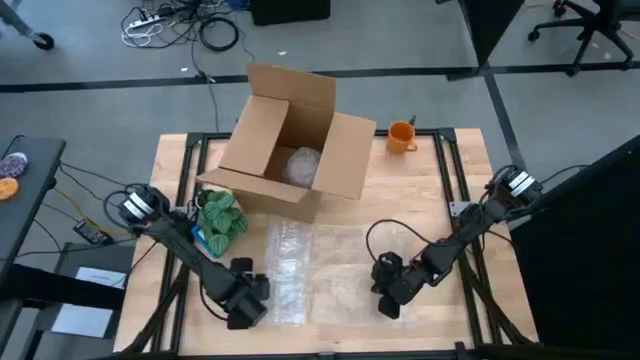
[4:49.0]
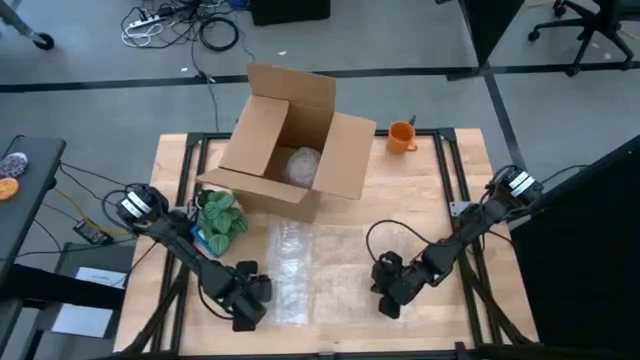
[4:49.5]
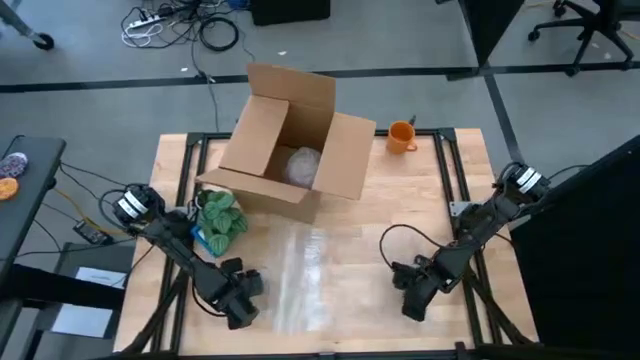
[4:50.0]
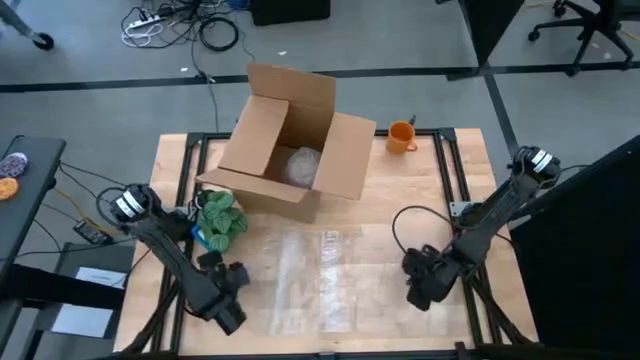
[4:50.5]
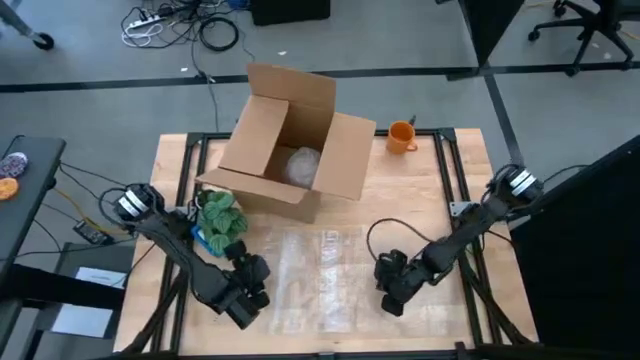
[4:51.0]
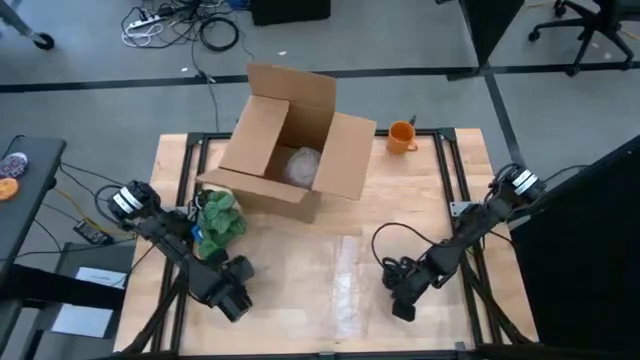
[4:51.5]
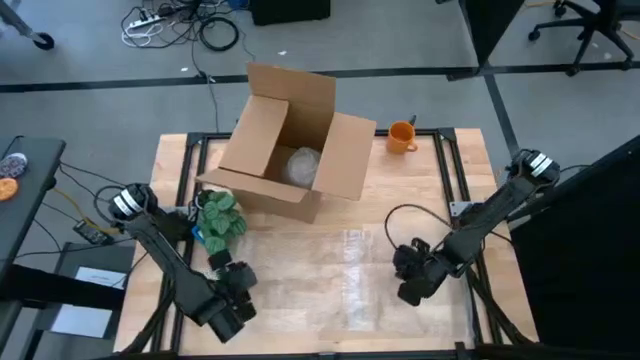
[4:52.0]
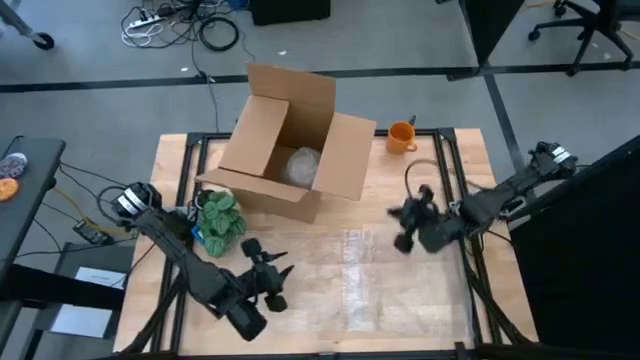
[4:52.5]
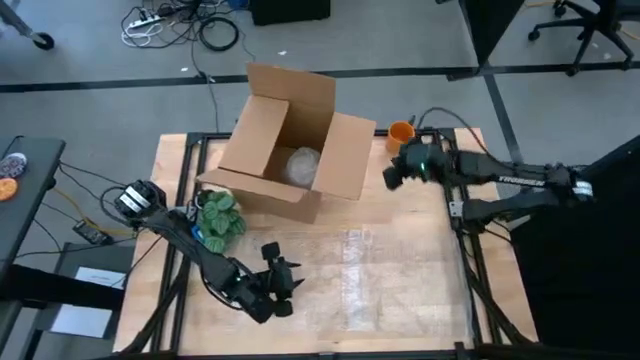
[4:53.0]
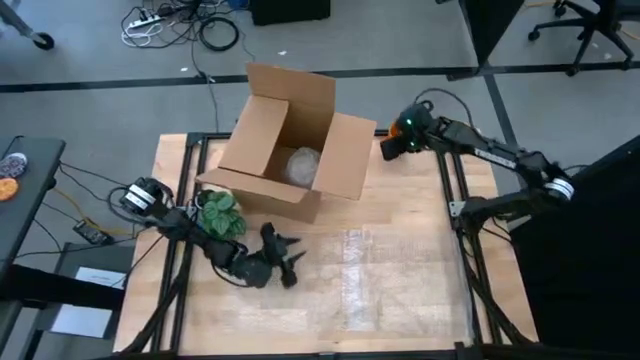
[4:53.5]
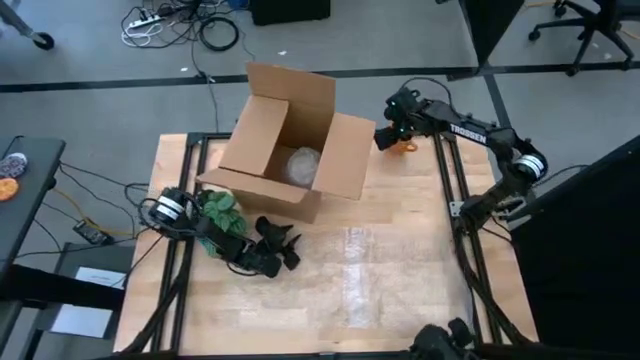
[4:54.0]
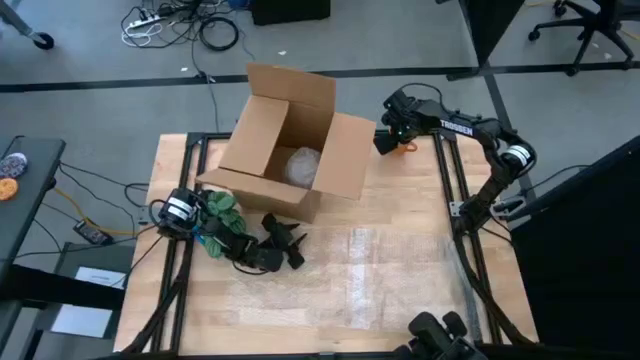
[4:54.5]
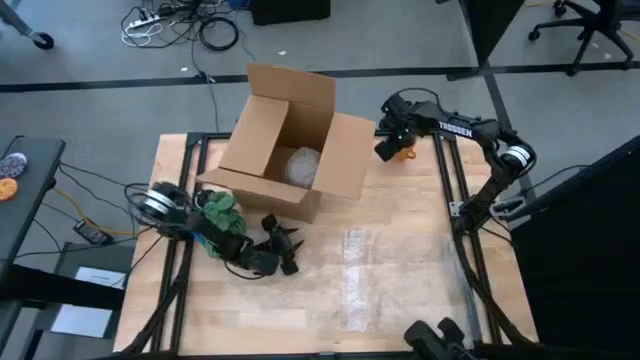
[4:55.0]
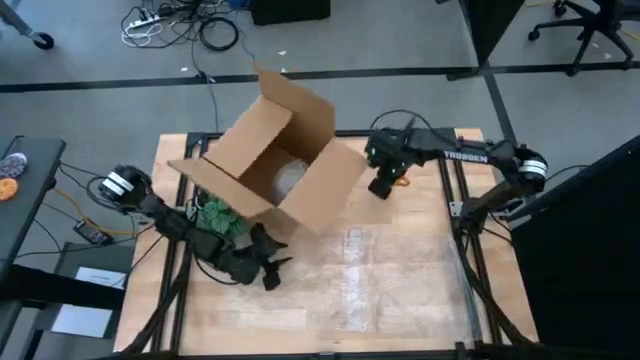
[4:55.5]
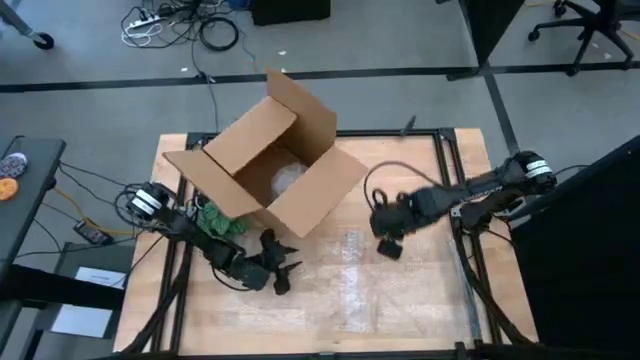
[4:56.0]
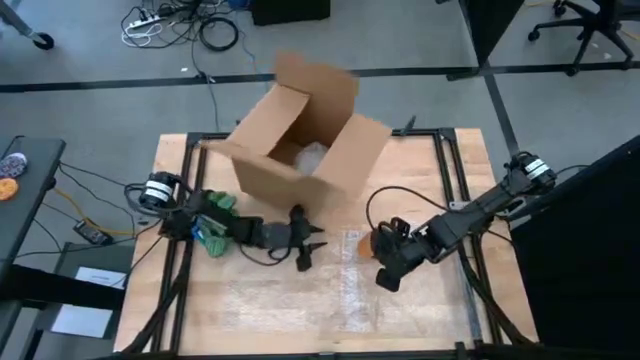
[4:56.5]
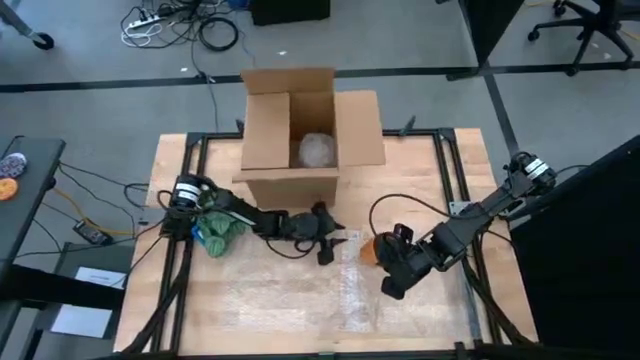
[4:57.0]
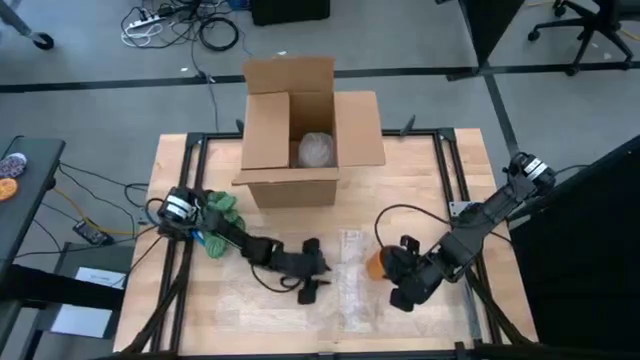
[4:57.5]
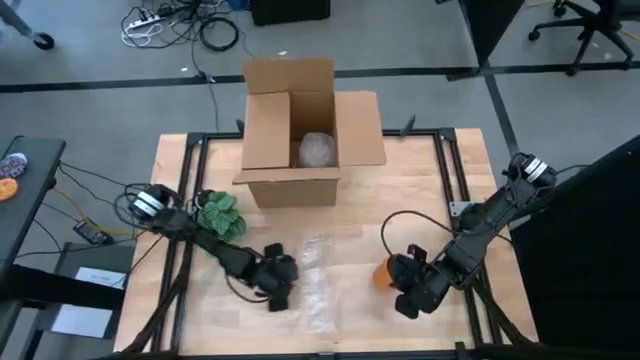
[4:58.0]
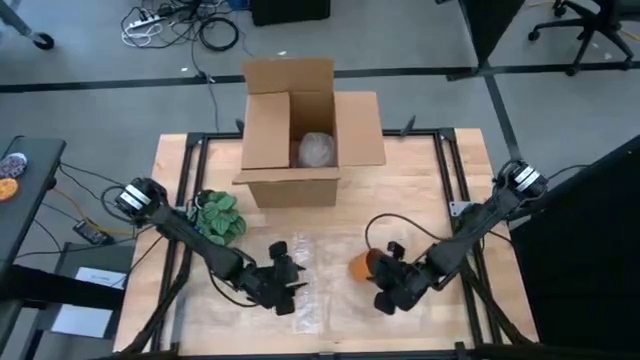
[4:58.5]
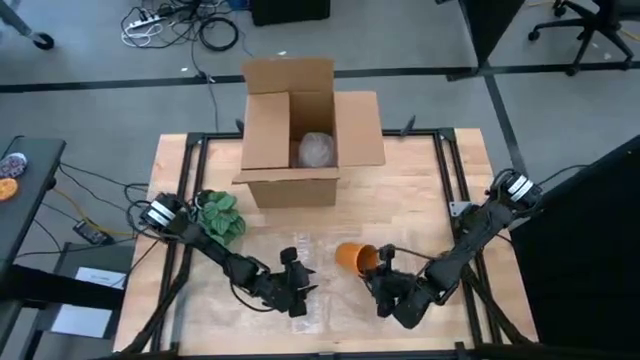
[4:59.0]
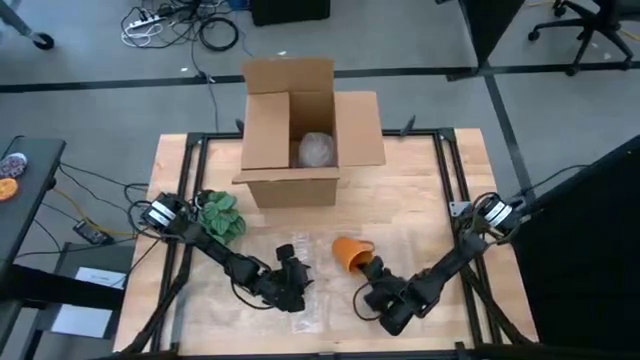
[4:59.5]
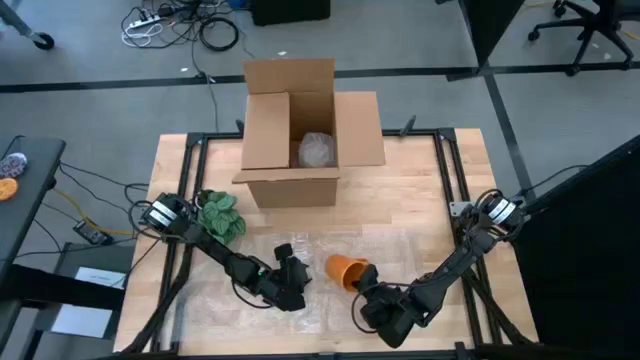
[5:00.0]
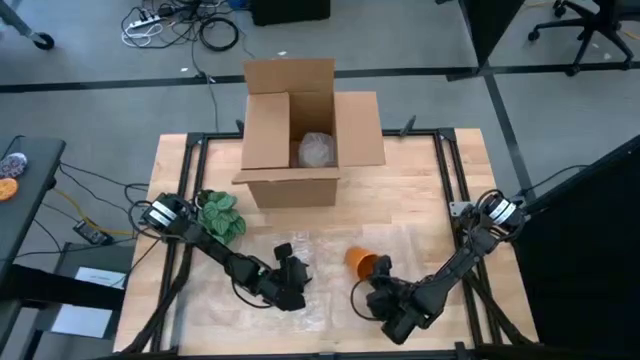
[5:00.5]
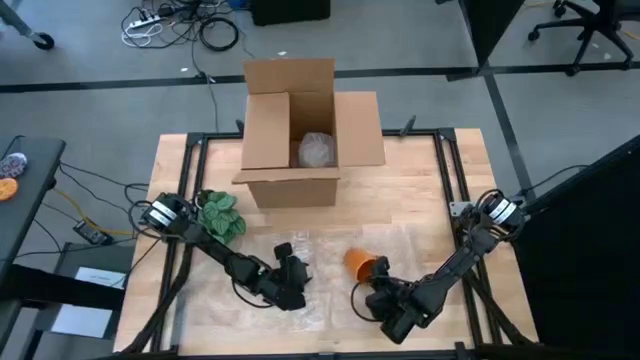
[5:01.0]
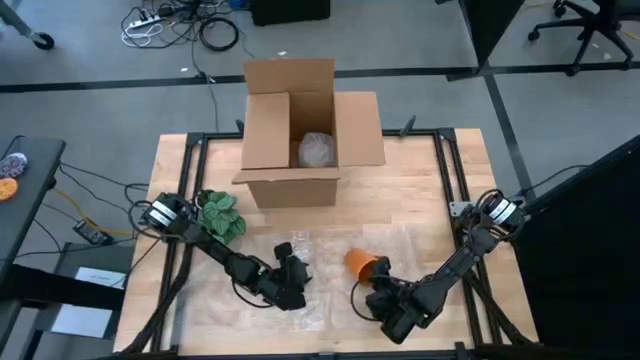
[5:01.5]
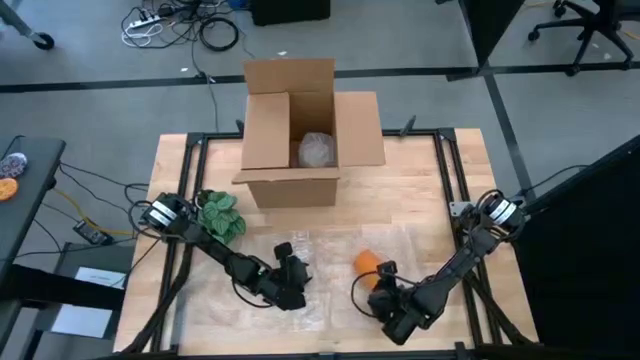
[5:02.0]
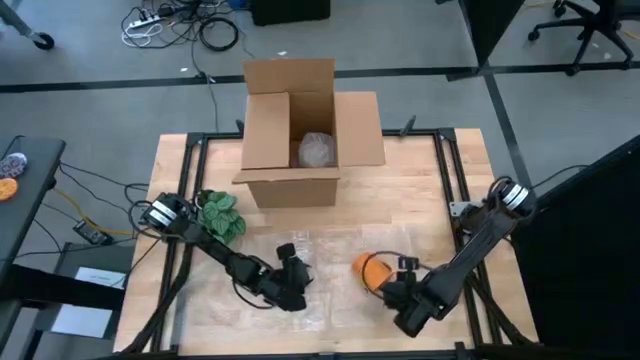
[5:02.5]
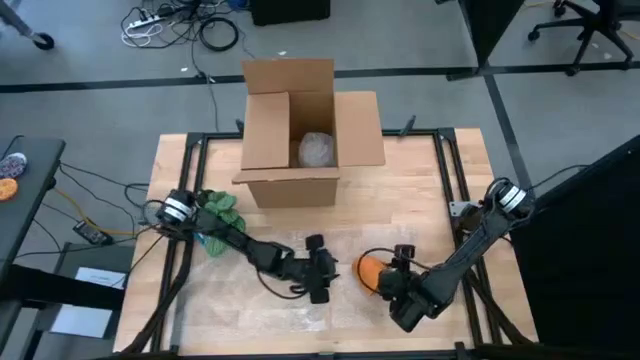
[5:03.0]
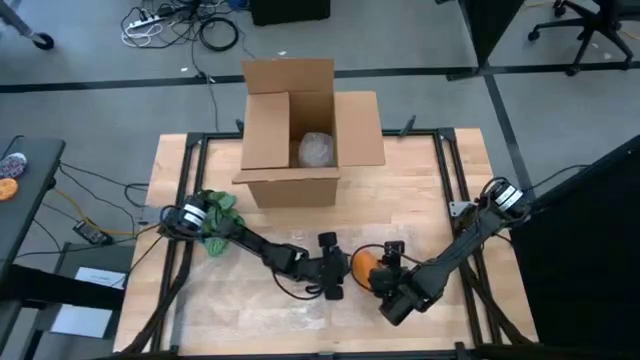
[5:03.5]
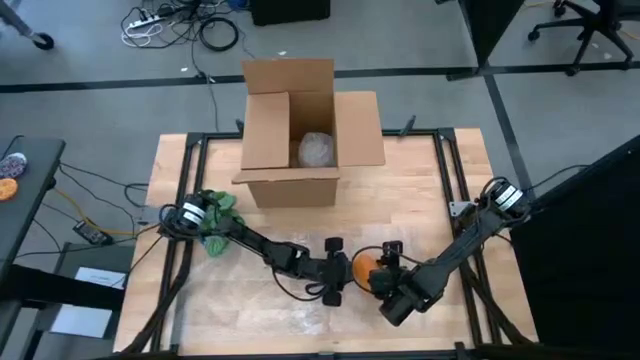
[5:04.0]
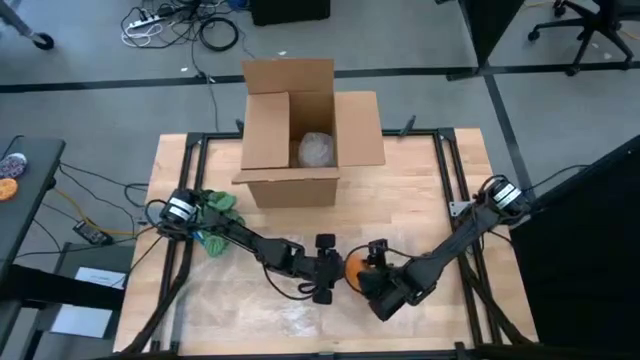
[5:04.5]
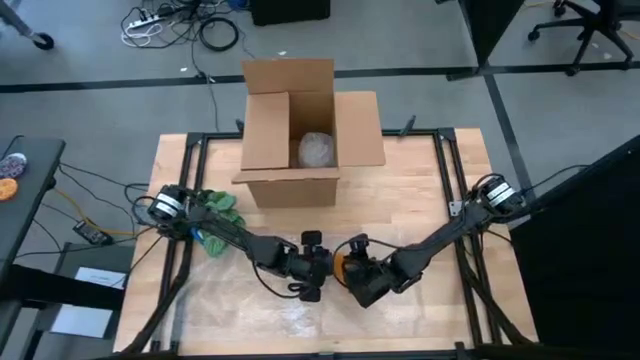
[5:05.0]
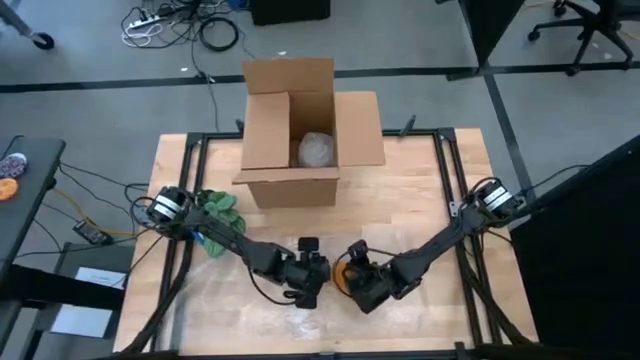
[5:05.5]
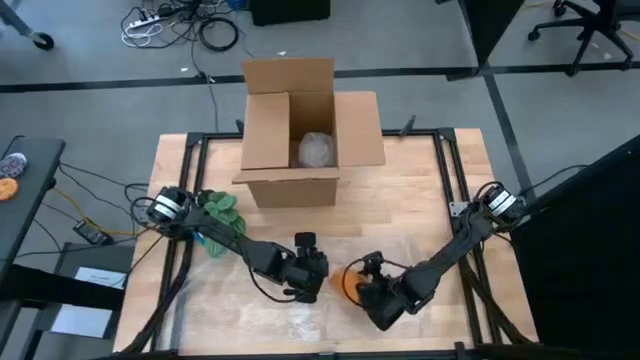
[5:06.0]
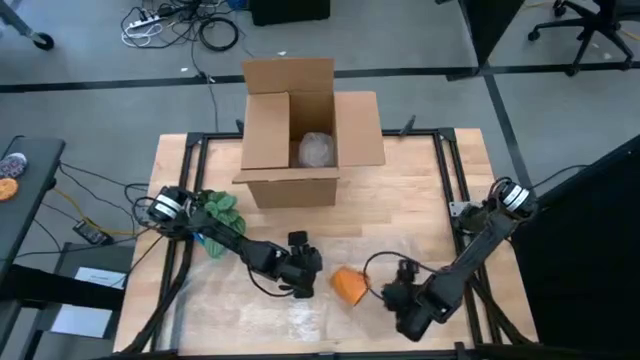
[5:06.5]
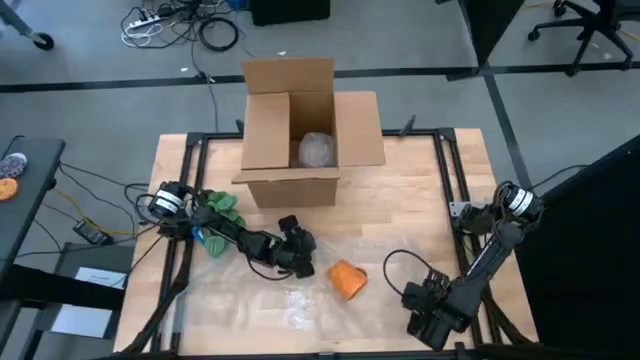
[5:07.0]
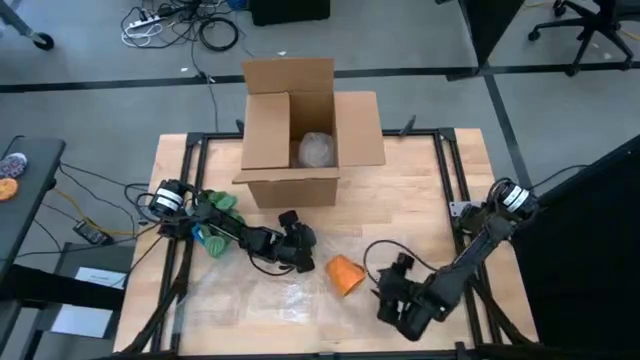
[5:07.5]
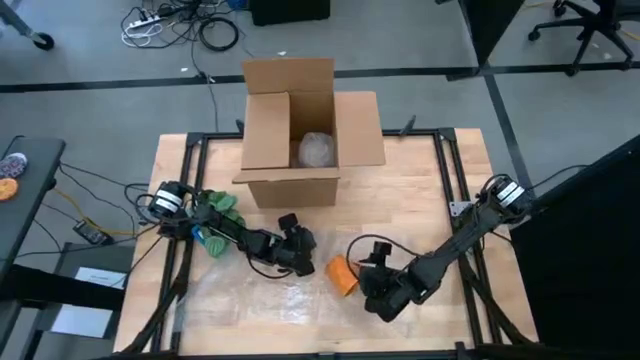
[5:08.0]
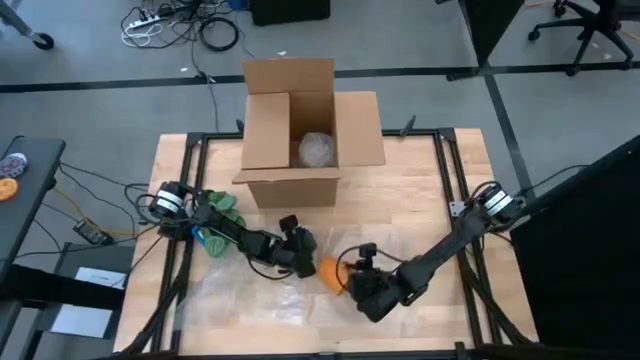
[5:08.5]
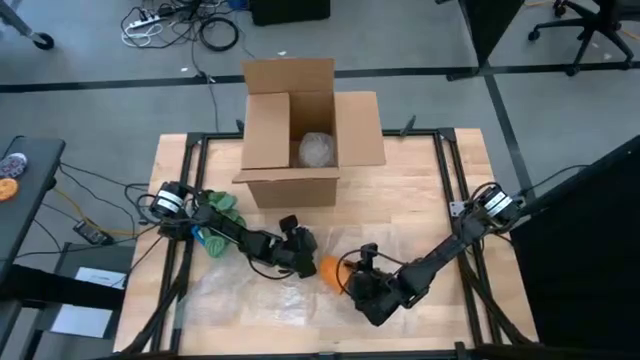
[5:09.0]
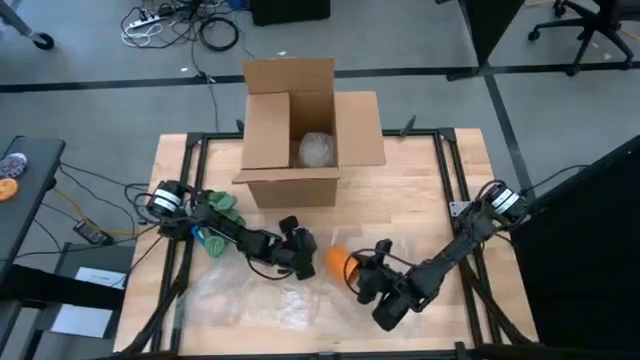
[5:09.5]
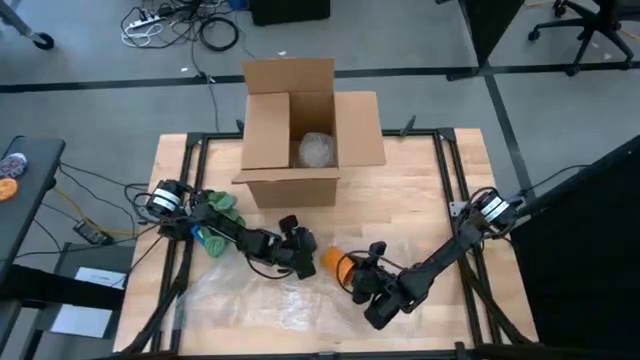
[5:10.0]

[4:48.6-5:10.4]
Task: wrap mug
Wrap the orange mug with the bubble wrap

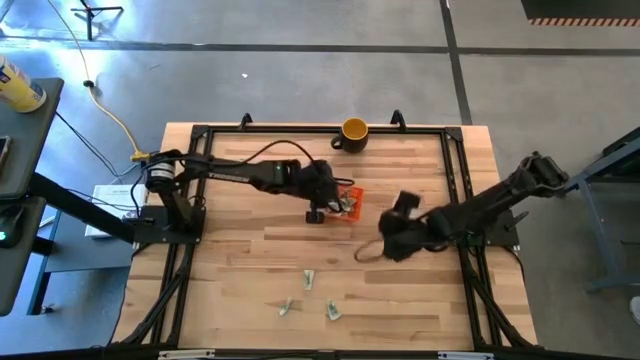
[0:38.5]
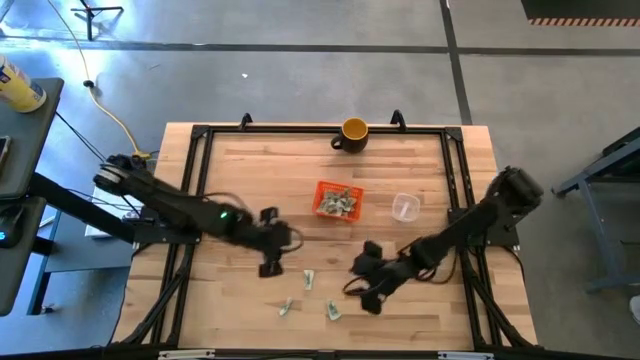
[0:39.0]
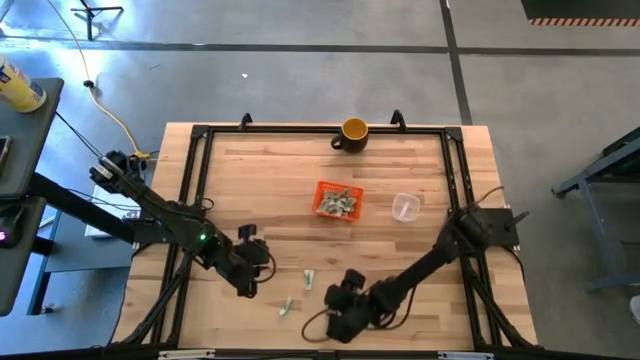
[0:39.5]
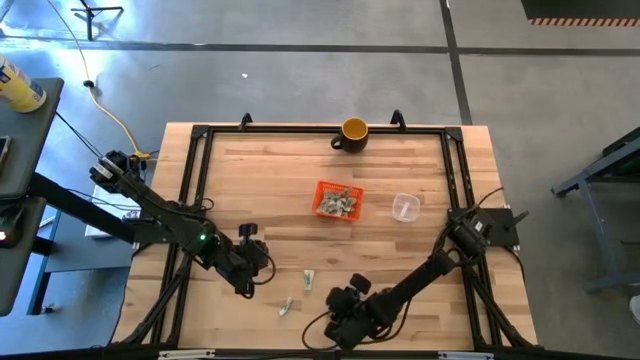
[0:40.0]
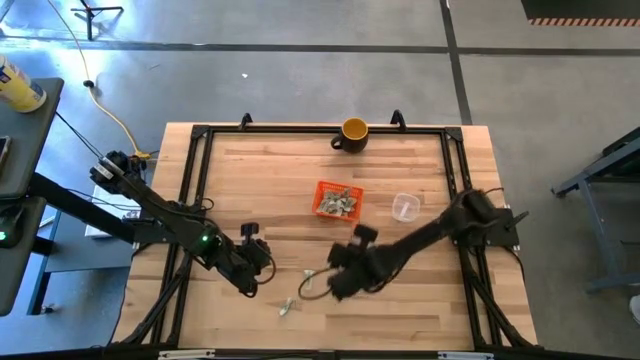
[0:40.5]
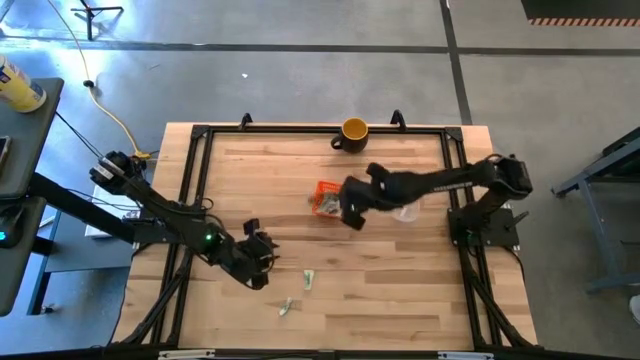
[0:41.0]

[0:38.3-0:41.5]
Task: Pick and place items into bin
Put the white stevia packet into the orange bin
